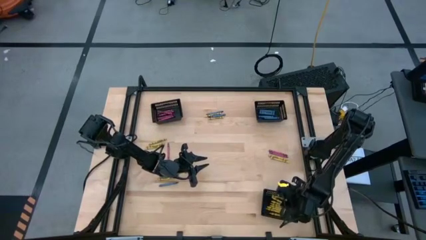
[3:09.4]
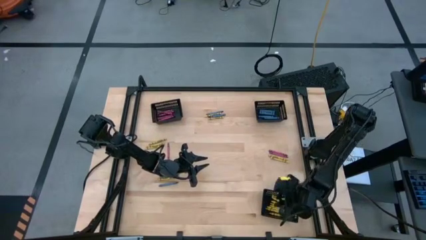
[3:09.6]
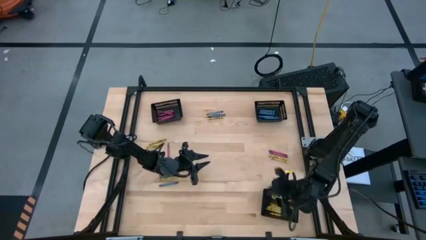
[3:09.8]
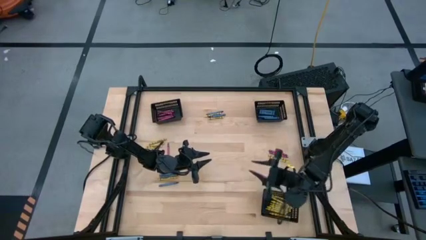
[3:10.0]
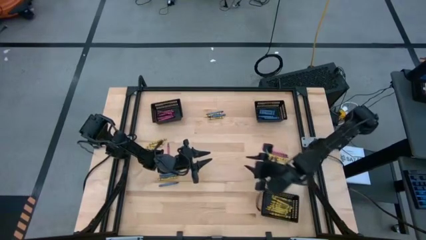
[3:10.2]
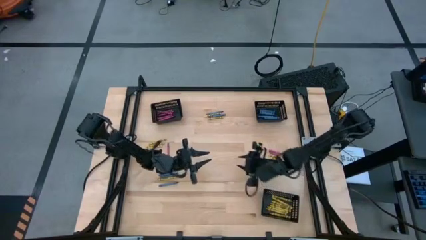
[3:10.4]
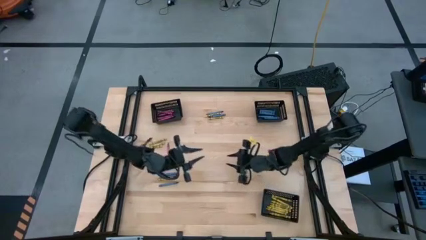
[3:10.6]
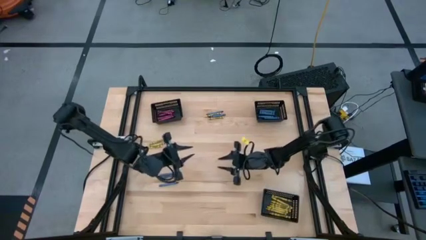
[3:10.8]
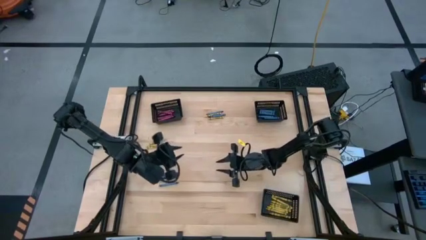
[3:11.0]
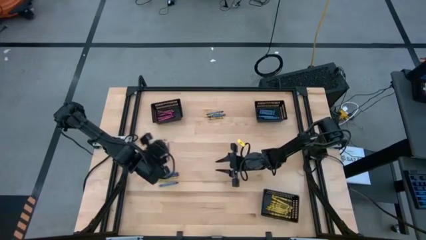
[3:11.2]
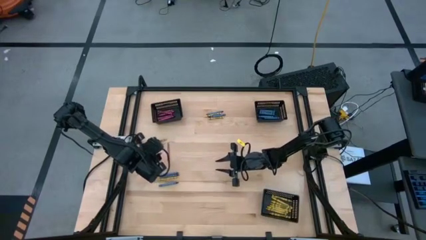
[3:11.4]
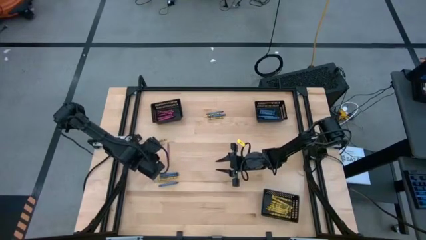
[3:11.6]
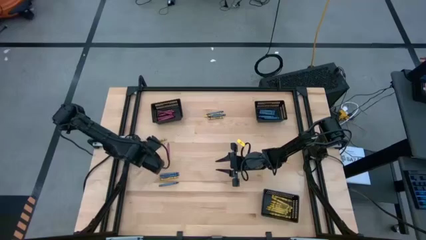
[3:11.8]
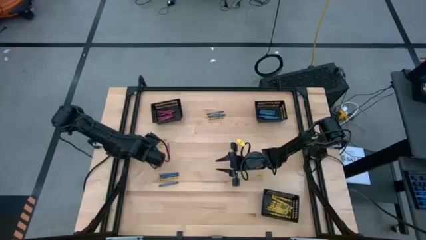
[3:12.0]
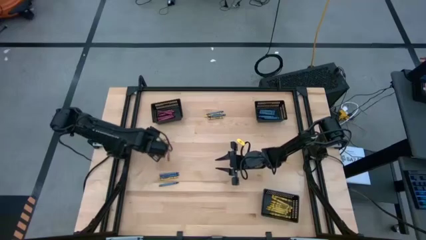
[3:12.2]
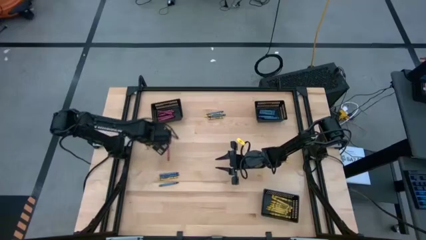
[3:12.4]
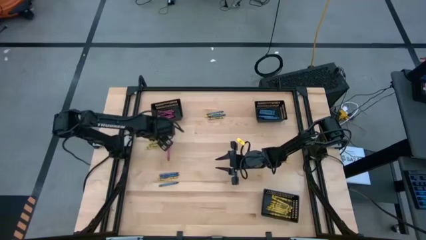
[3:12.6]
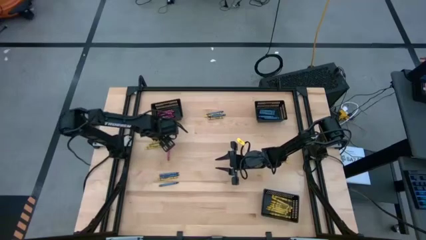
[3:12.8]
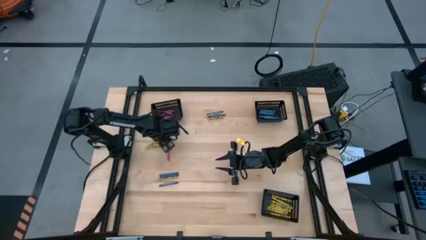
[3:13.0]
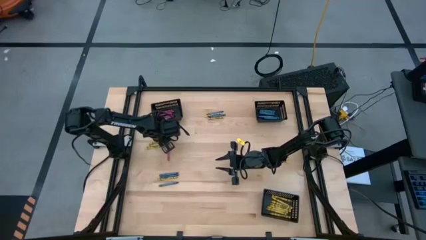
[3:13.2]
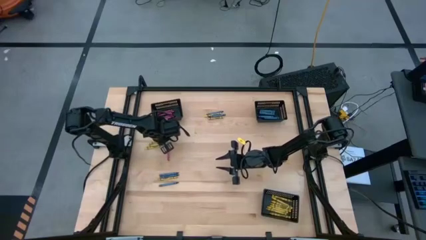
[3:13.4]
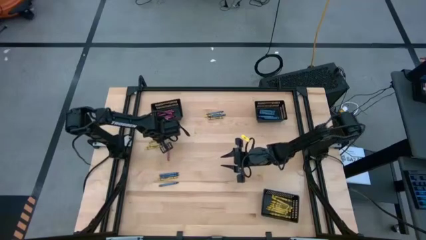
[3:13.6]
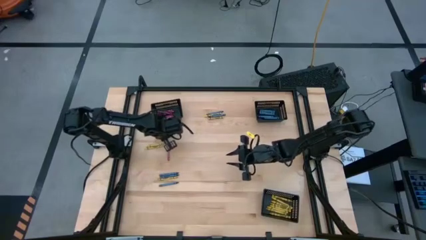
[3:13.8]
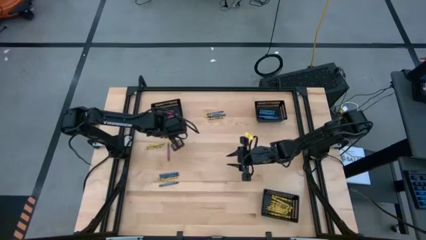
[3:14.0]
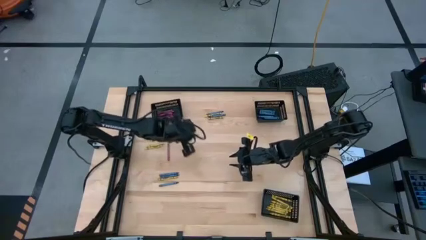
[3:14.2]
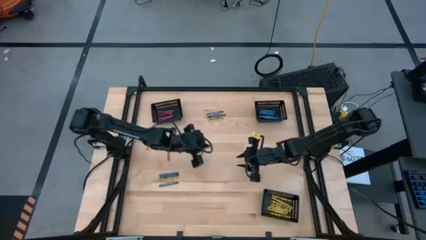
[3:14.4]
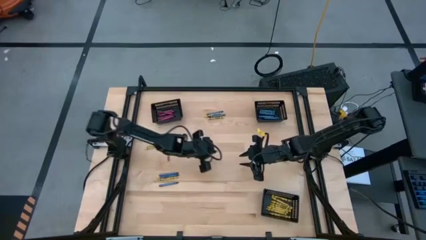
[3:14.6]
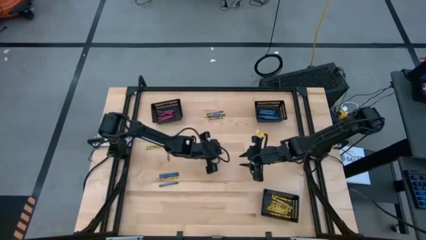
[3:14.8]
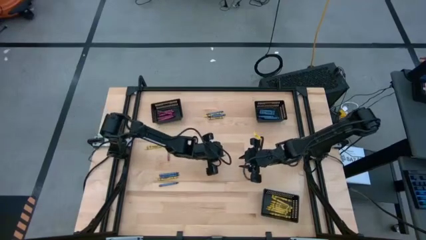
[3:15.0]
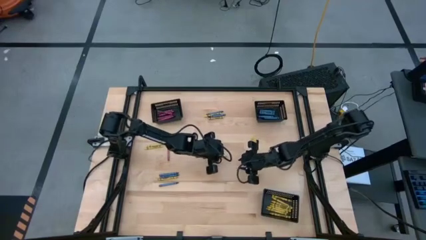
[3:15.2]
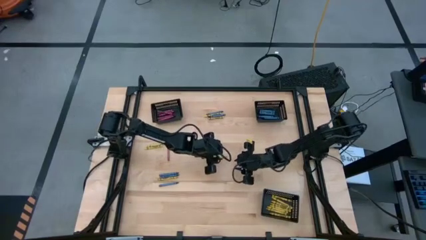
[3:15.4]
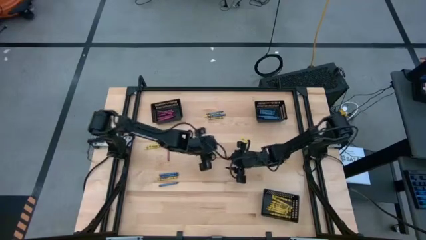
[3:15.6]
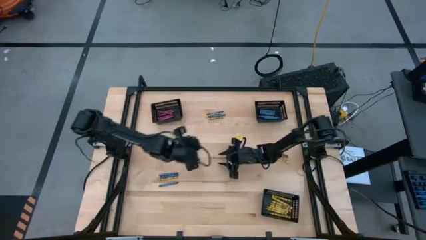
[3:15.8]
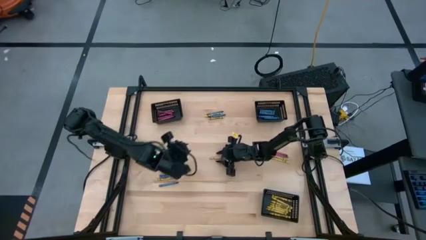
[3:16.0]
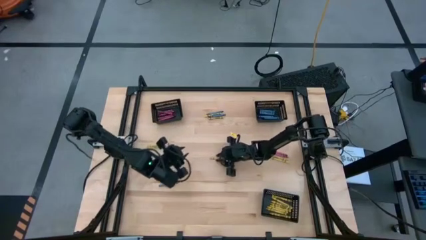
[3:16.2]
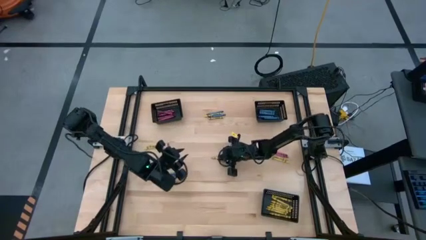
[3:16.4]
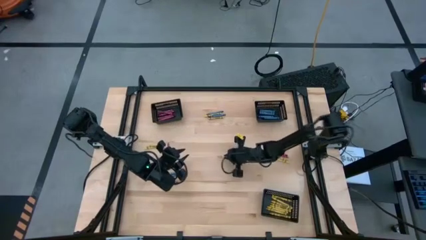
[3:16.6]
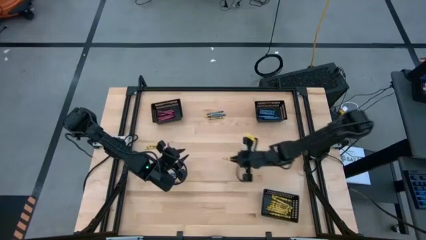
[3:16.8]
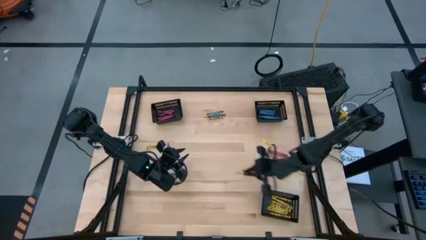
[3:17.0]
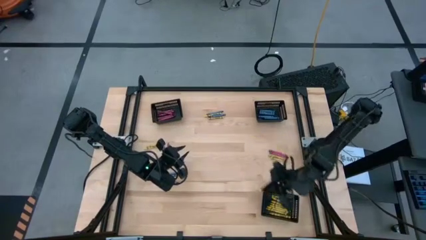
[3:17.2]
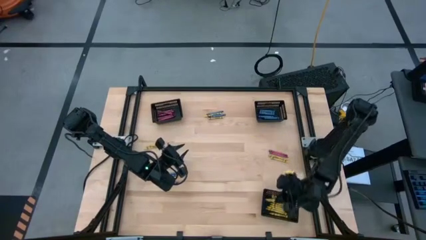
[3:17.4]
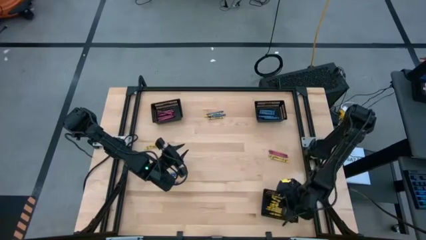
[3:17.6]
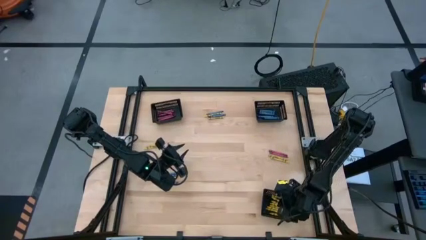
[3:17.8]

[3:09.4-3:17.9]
Task: Sort crayons
Put the yellow crayon into the bottom black bin

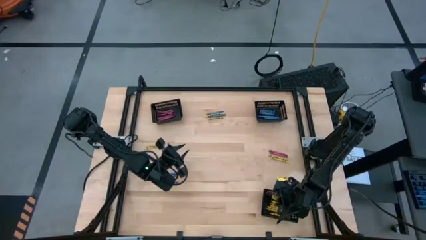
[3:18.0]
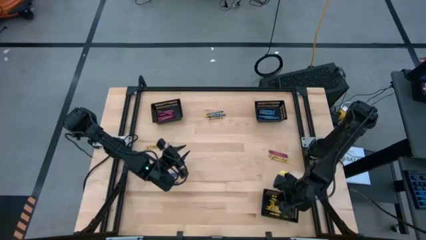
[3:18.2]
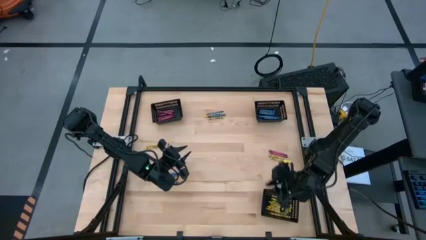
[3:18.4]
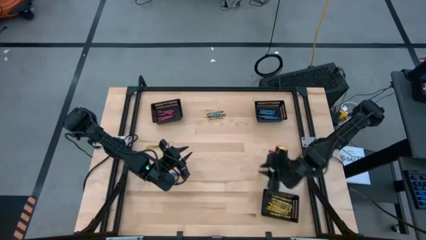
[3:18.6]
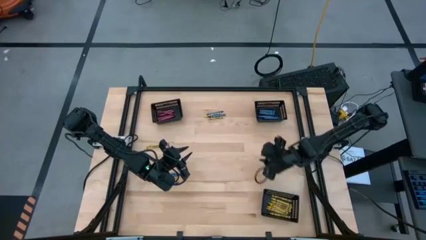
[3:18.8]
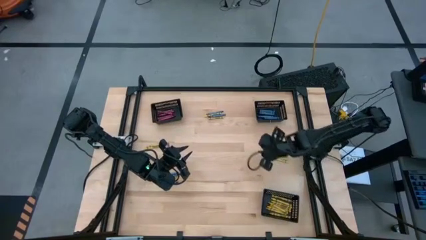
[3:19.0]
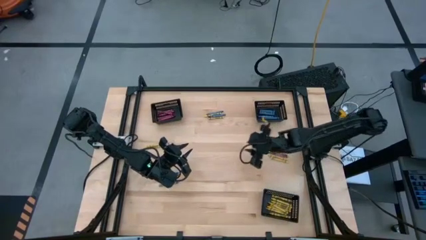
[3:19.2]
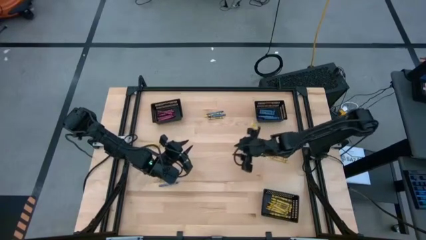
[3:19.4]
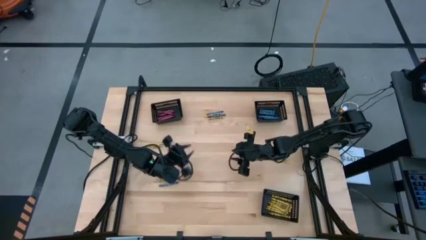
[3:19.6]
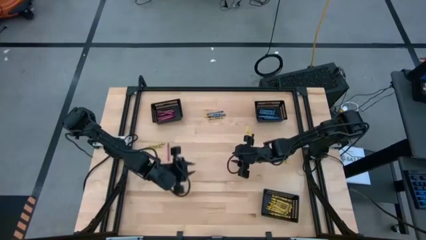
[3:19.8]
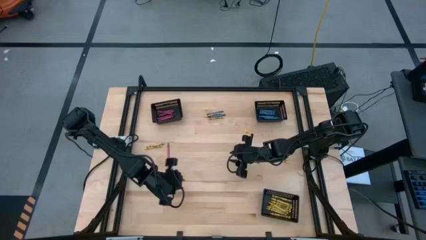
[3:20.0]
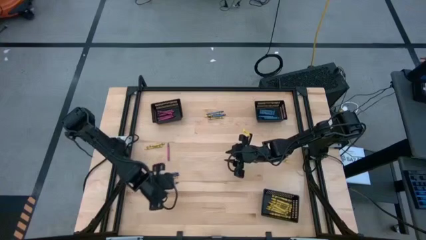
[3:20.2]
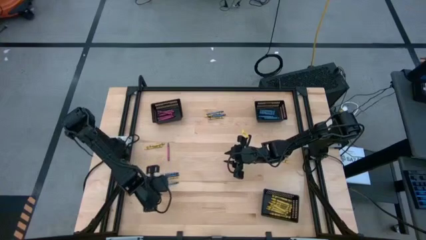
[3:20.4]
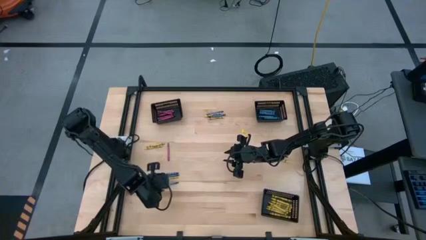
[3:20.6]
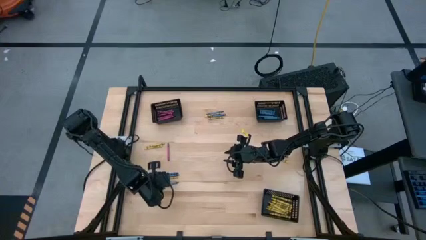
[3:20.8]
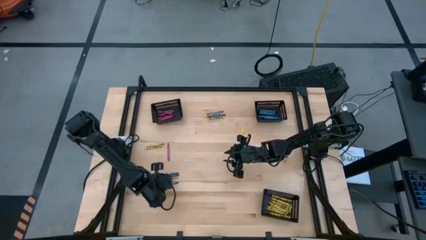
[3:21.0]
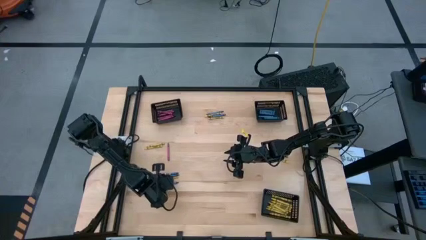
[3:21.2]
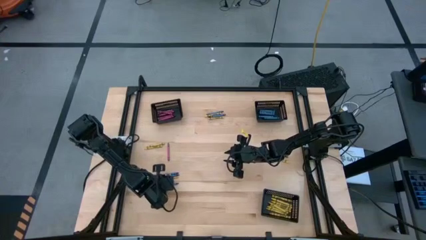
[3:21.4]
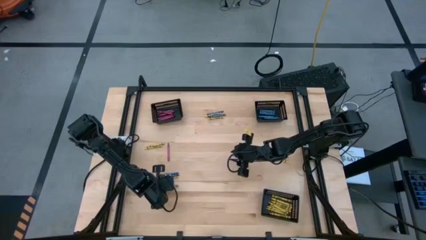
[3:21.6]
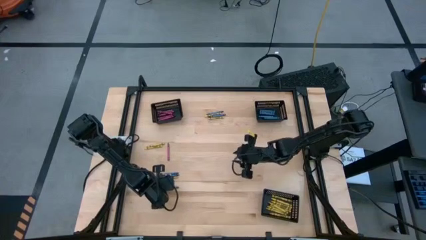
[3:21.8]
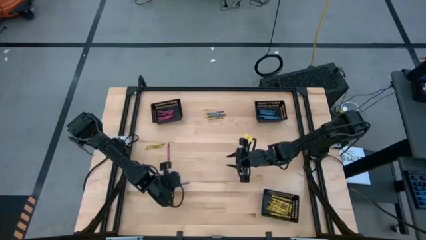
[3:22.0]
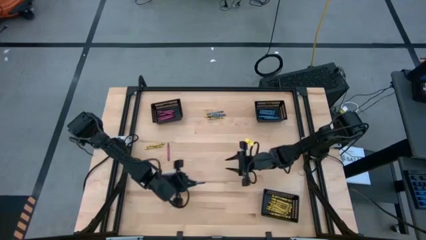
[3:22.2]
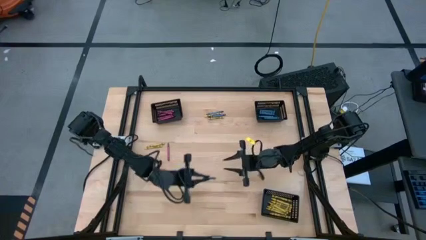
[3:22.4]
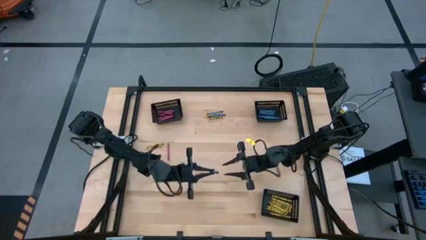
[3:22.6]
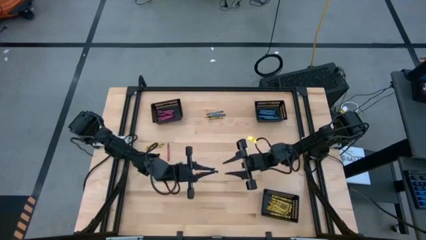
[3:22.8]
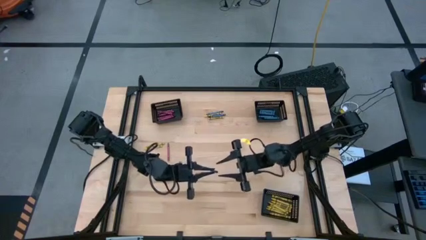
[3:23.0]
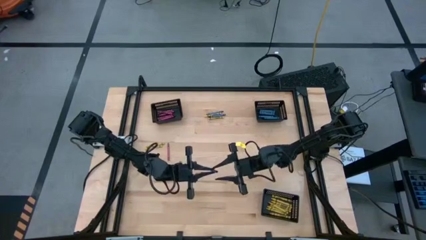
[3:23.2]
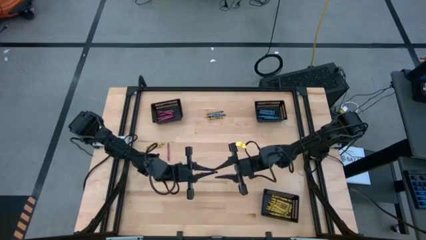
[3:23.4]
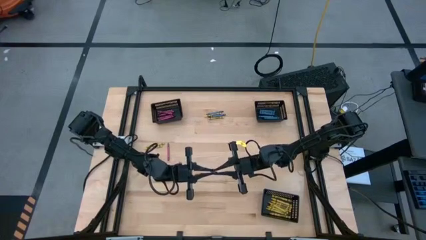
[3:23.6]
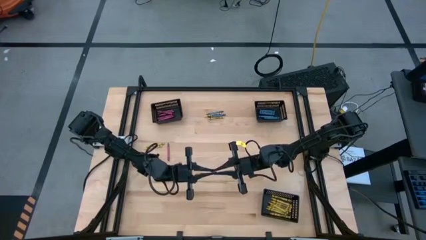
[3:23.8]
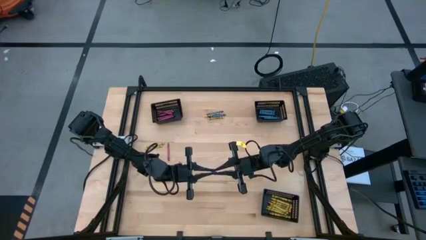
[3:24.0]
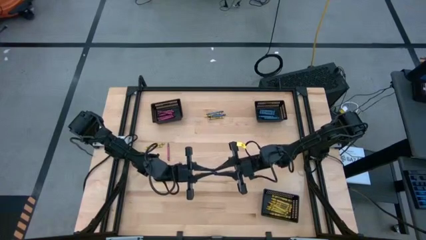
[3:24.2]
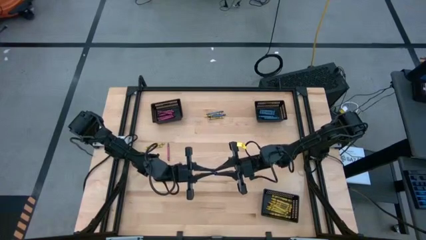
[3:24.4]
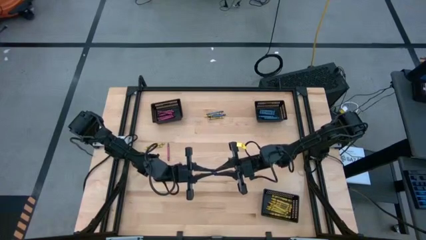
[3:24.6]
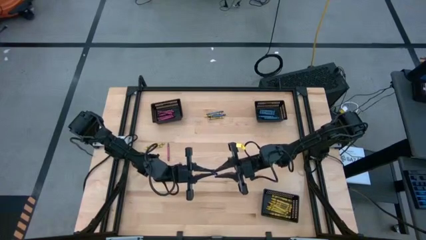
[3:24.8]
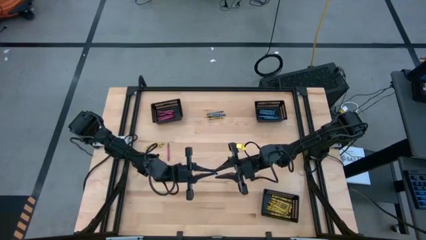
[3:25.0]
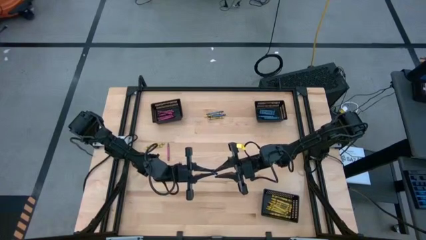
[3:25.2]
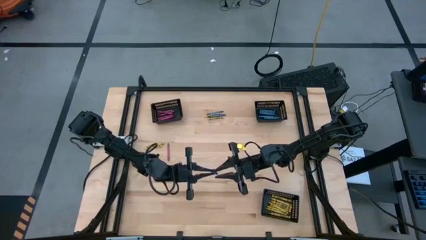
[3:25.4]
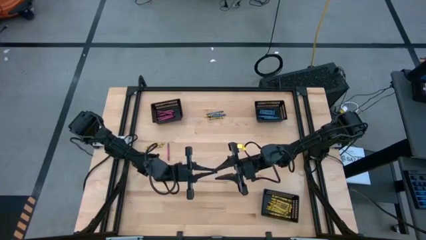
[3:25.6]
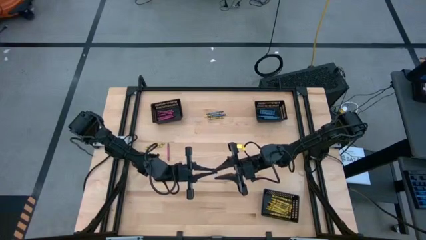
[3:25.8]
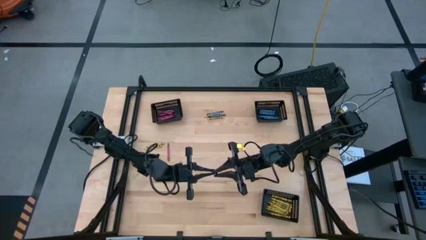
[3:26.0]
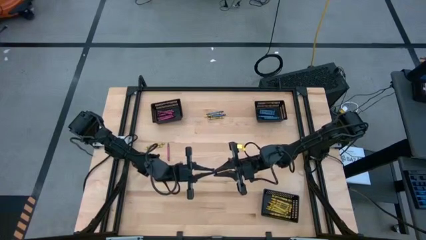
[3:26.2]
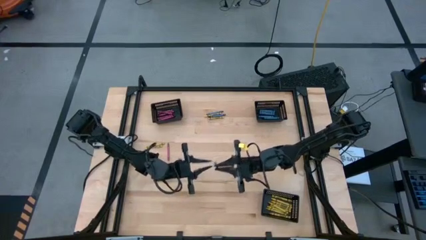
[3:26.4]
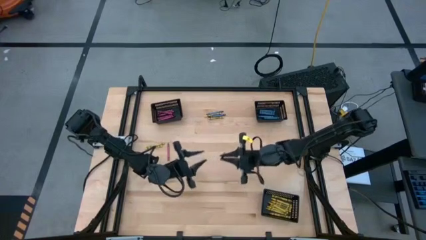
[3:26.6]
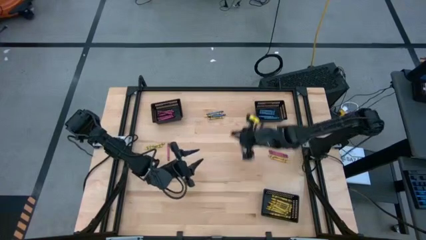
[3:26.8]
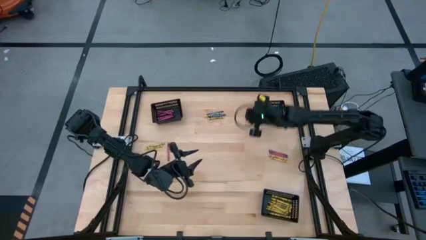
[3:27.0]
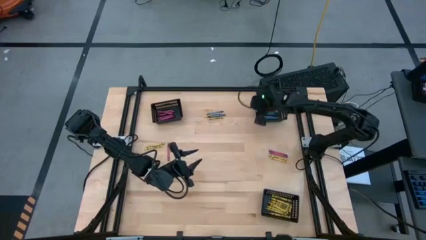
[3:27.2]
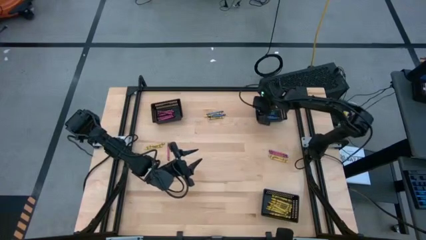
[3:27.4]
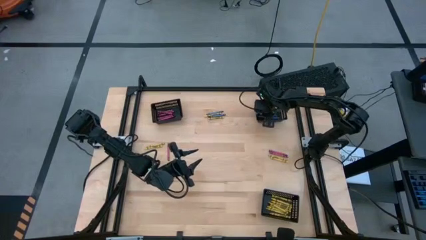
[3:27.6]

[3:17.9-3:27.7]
Put the blue crayon into the top right black bin
